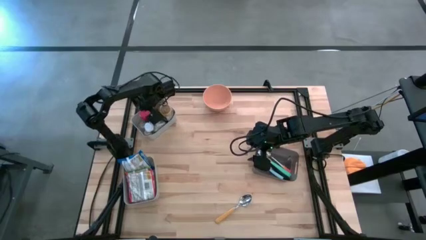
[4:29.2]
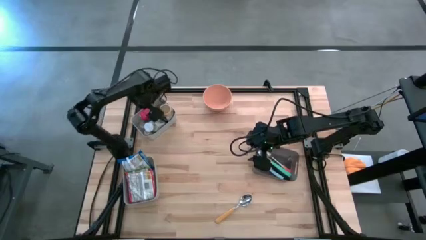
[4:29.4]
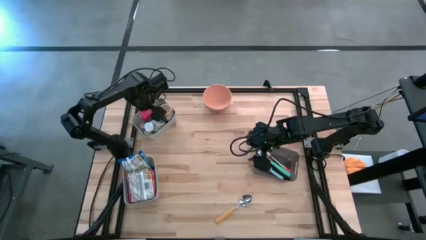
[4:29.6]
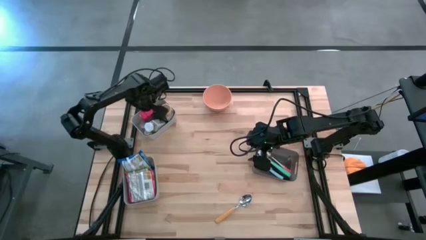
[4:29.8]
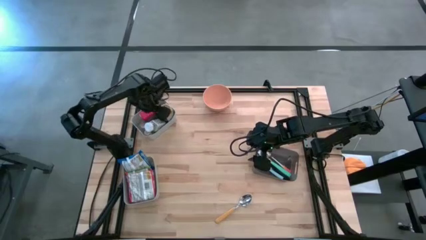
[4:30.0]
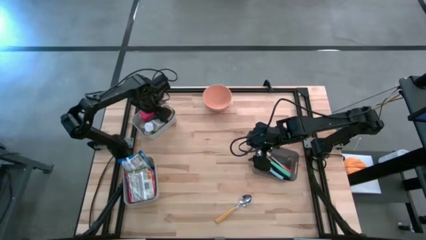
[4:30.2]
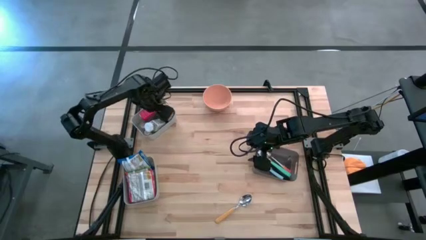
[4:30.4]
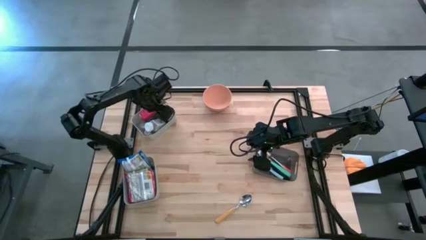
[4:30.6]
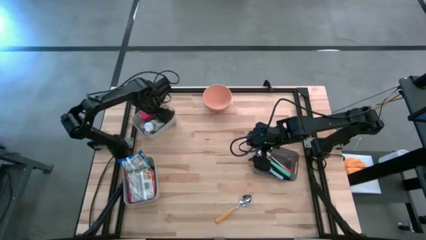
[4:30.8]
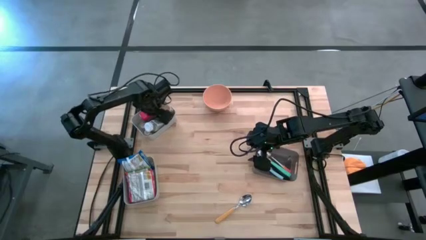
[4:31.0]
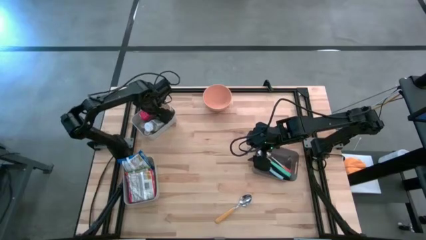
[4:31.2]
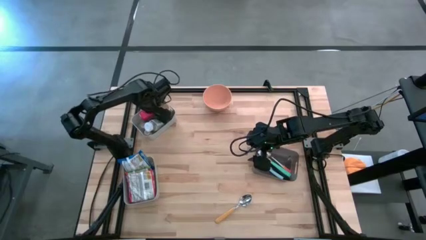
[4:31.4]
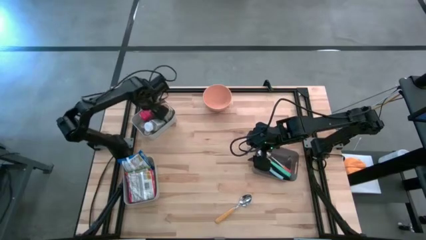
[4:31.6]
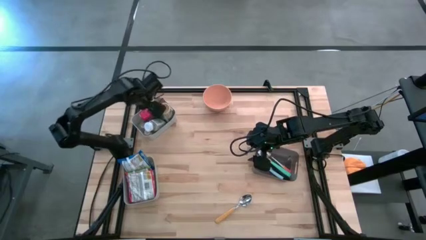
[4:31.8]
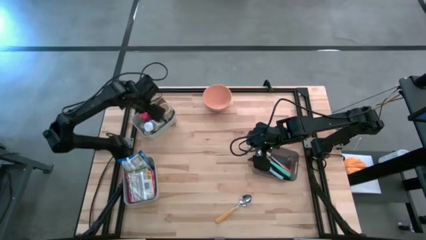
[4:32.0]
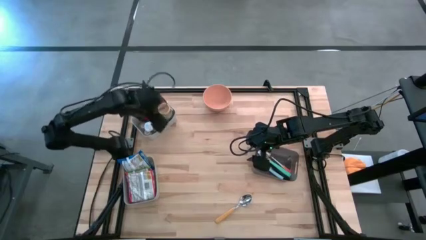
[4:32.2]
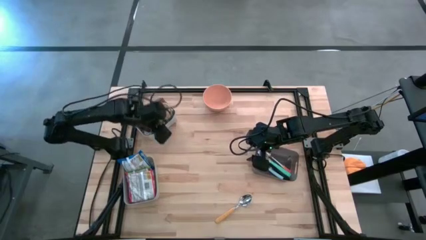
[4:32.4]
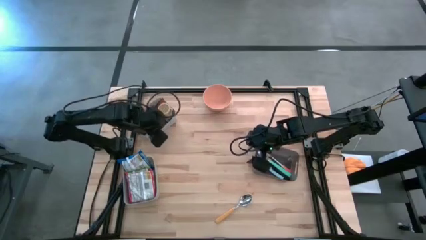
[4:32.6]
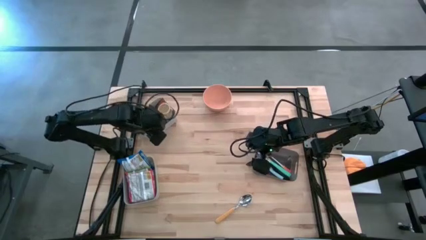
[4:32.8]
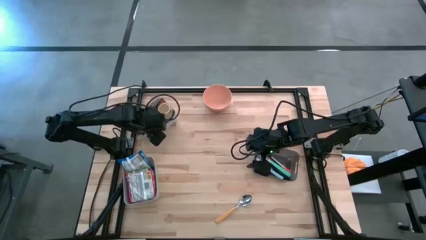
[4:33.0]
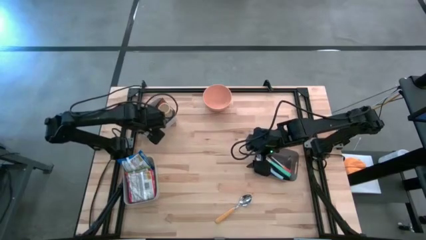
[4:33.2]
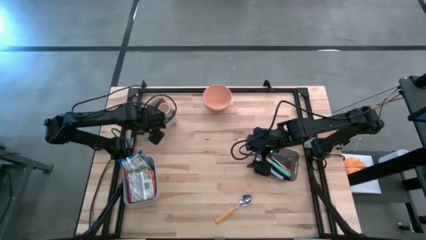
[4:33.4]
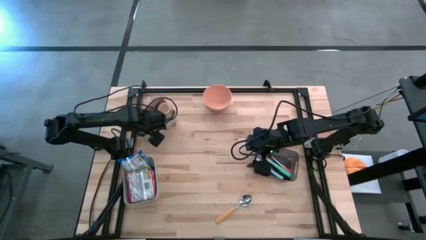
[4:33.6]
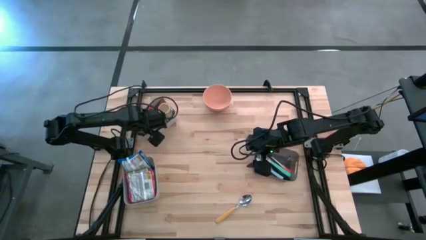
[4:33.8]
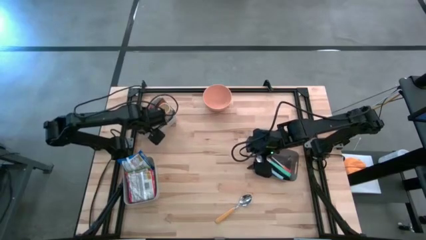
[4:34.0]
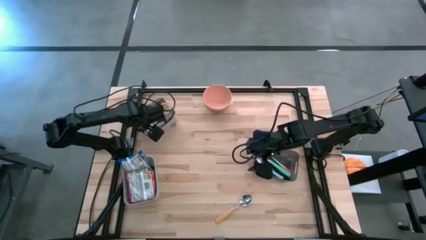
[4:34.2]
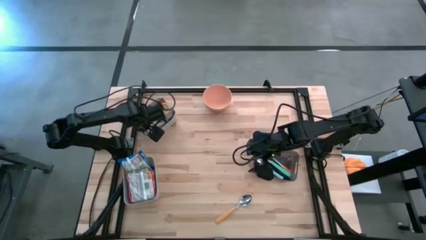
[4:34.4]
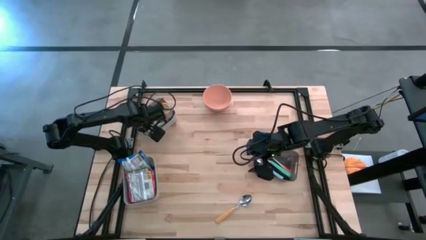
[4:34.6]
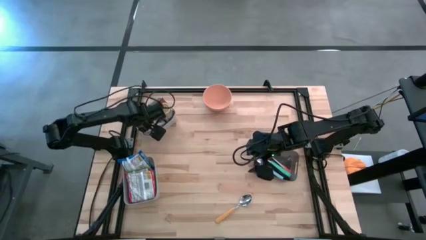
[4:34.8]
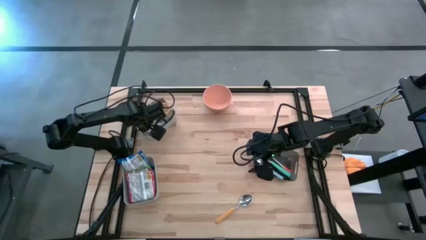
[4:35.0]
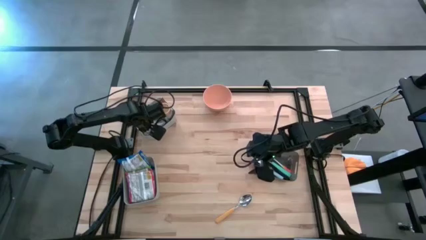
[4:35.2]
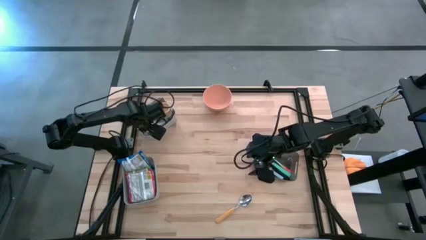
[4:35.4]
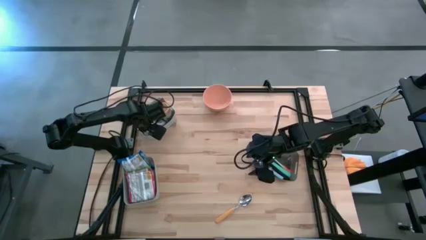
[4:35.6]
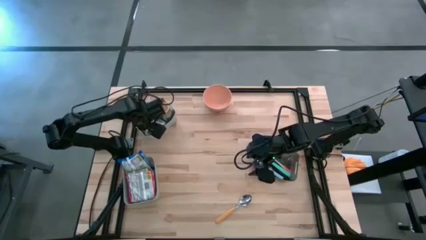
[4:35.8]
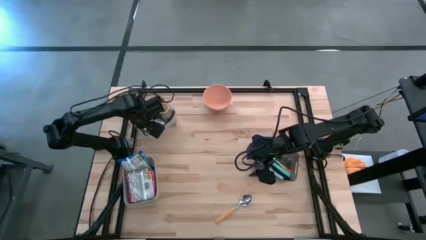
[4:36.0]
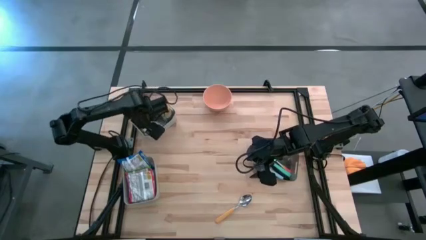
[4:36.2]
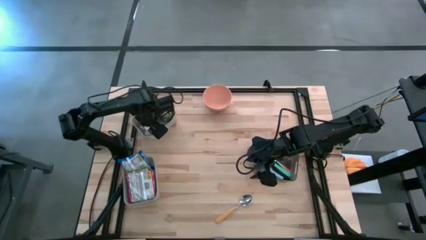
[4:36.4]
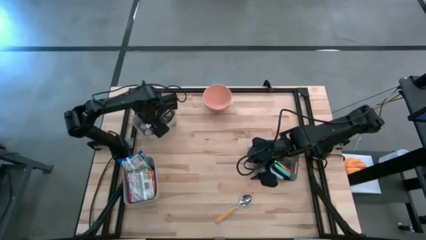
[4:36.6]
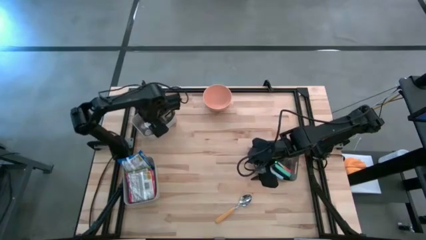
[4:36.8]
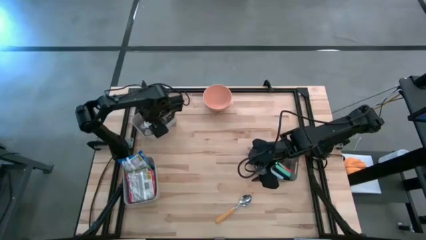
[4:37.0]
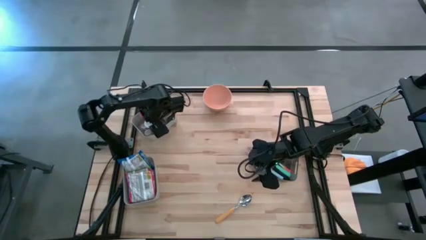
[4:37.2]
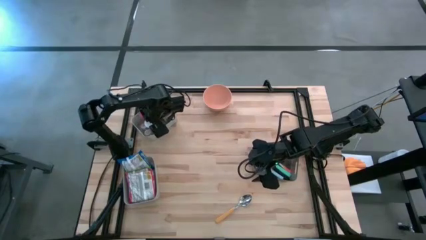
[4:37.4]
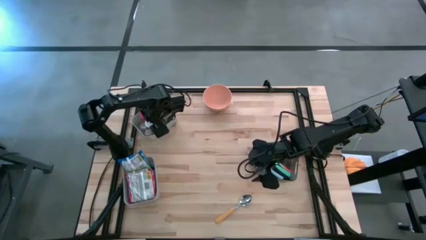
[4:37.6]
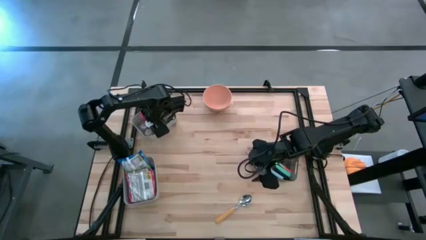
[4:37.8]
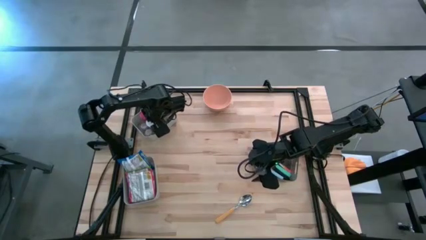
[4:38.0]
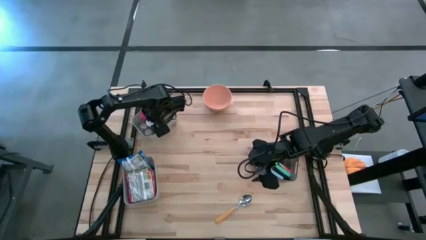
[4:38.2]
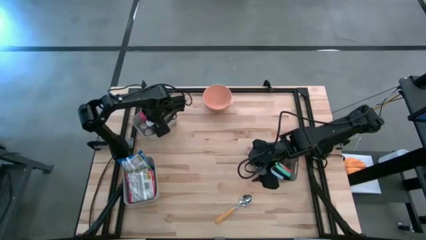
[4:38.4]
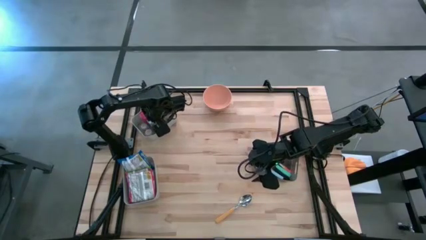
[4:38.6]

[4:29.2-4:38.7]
Adjust the bagel seasoning bottle

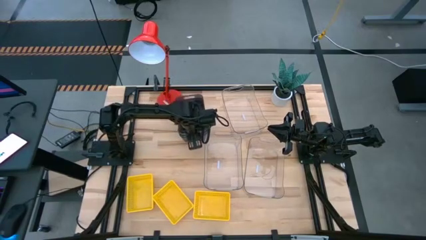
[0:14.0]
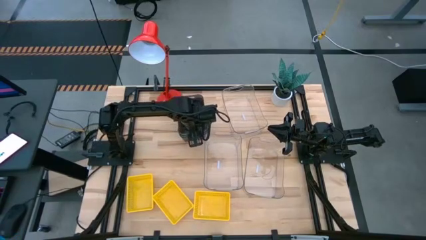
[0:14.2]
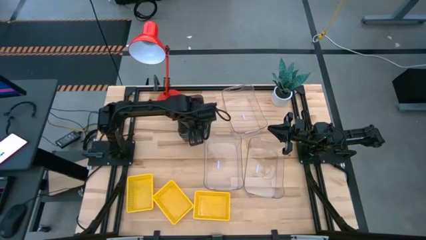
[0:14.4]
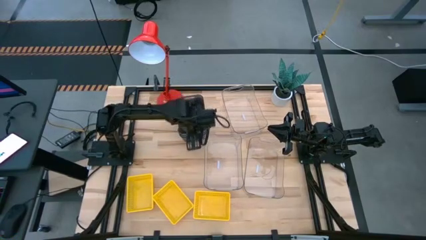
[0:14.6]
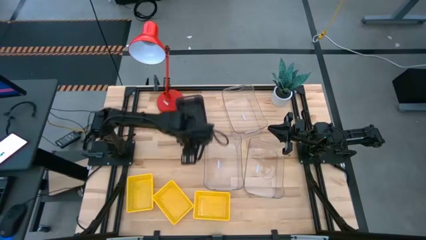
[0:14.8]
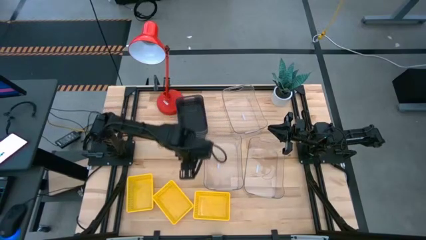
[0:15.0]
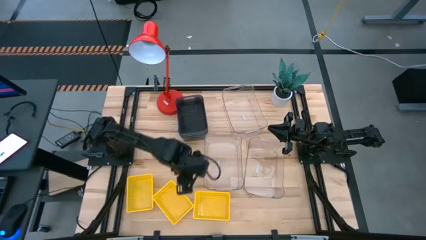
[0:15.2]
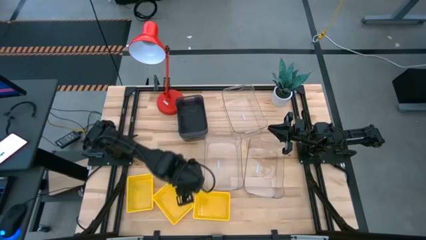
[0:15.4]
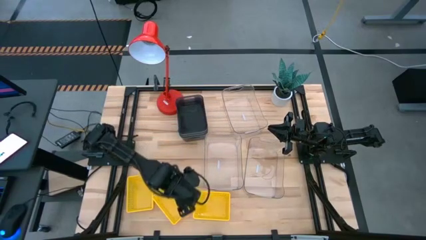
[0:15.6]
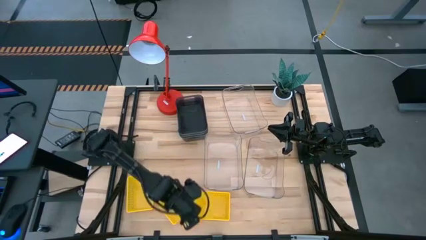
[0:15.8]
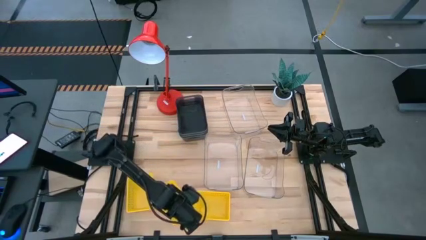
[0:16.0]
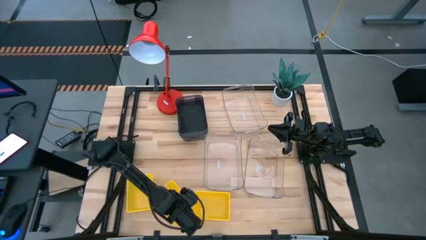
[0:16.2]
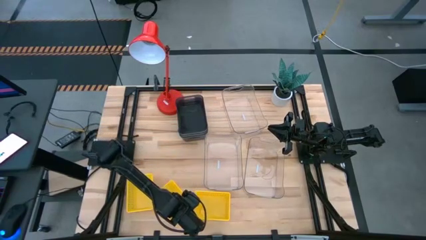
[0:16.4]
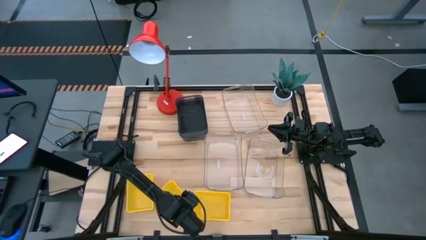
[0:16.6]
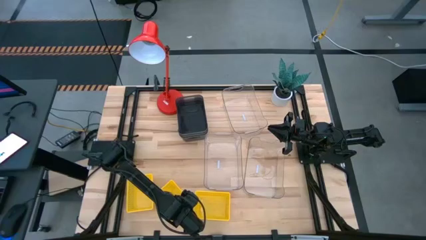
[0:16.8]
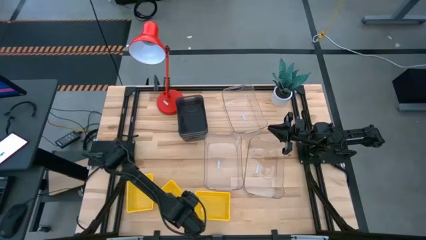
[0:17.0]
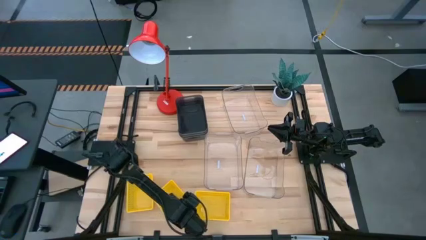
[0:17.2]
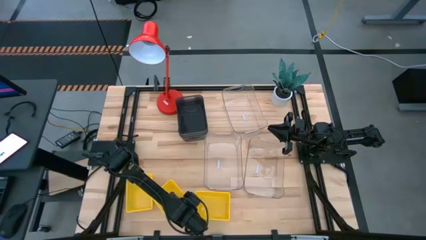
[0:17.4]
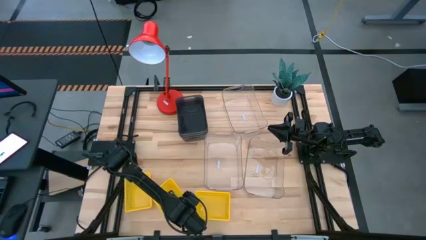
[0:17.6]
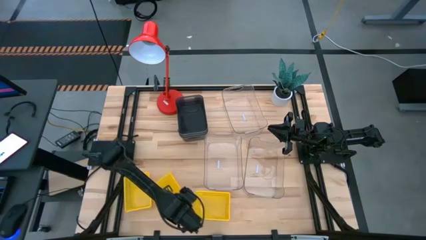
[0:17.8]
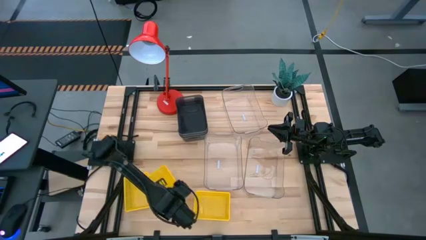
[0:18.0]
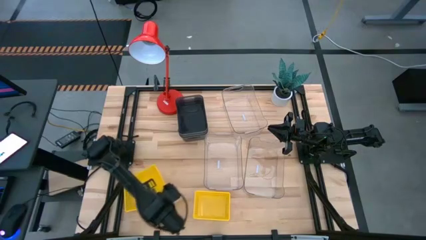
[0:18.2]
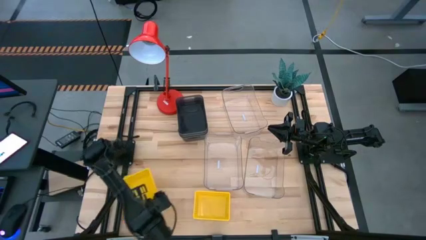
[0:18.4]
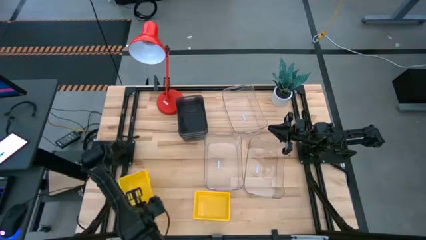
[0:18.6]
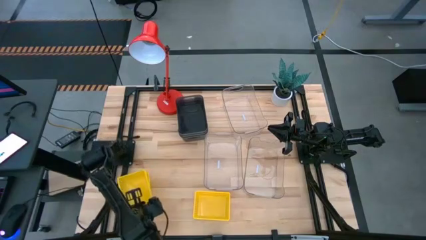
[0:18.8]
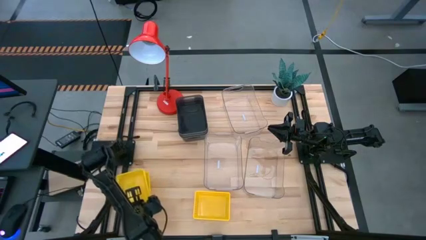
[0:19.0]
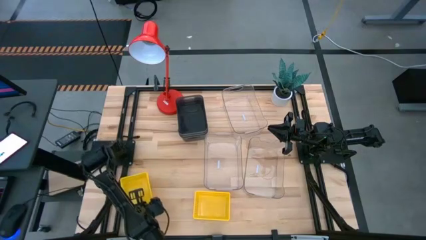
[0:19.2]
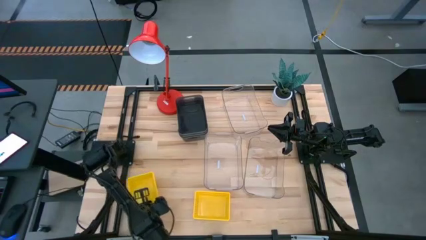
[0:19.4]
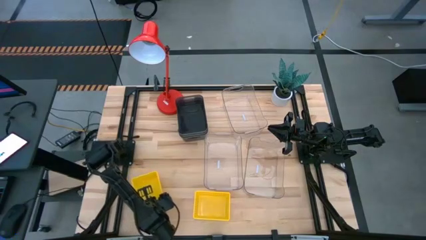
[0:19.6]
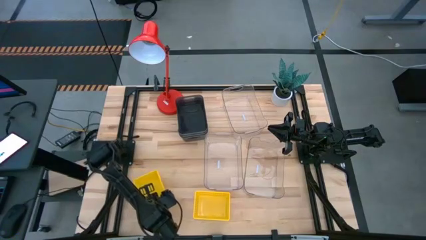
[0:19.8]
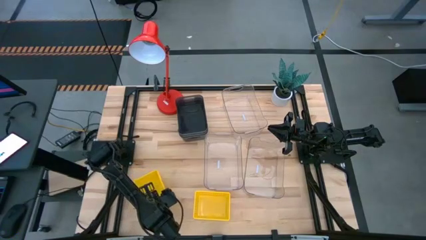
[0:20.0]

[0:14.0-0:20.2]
Stack the middle yellow bin on top of the left yellow bin
